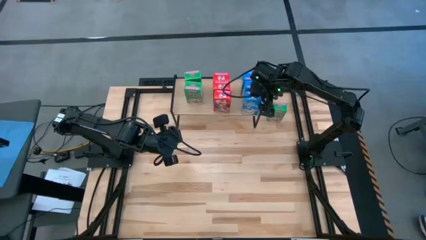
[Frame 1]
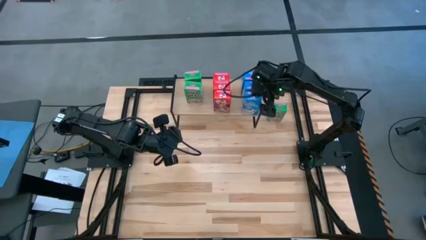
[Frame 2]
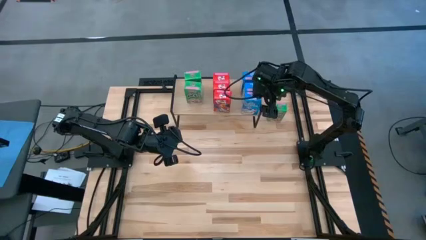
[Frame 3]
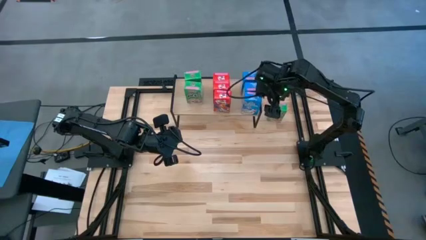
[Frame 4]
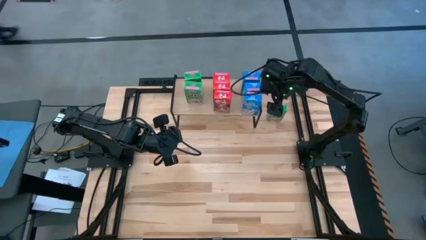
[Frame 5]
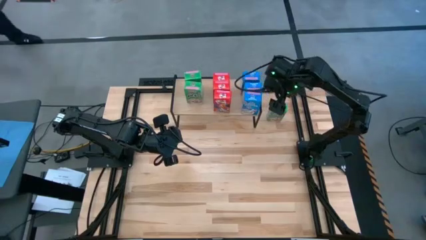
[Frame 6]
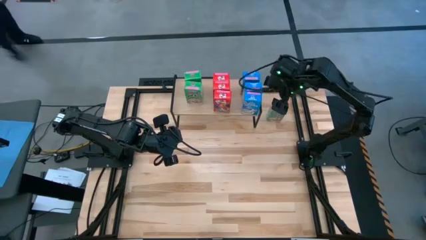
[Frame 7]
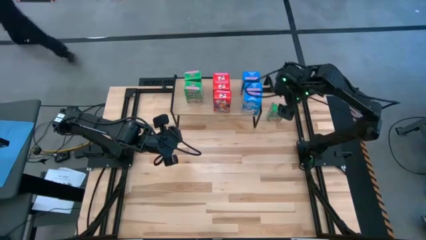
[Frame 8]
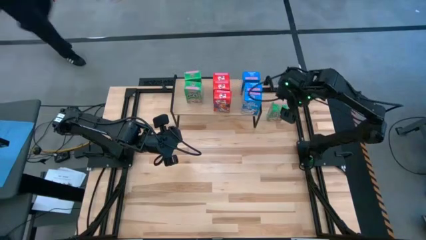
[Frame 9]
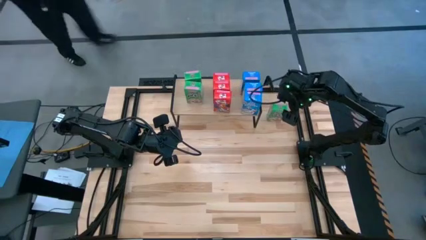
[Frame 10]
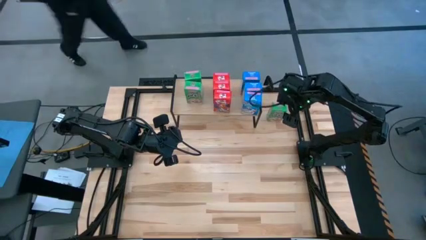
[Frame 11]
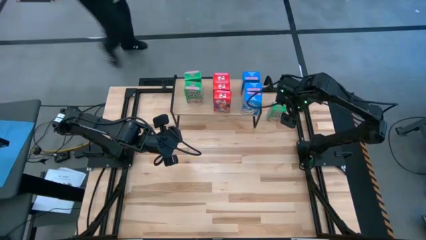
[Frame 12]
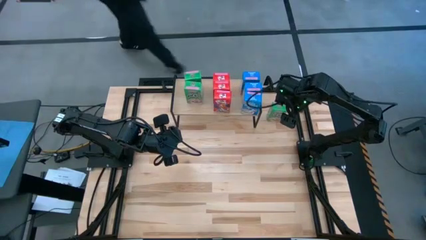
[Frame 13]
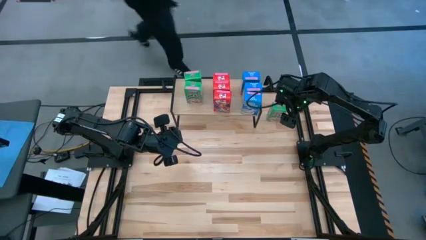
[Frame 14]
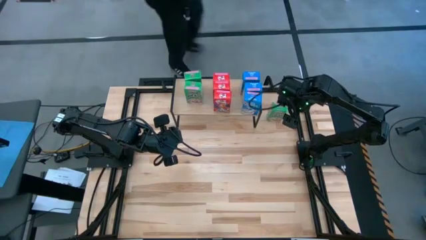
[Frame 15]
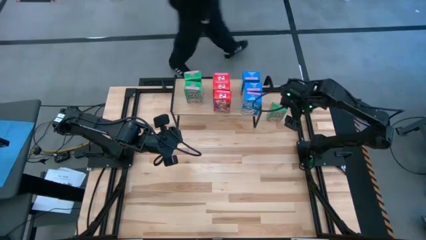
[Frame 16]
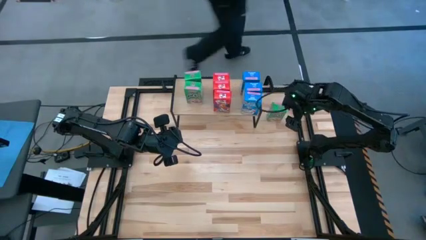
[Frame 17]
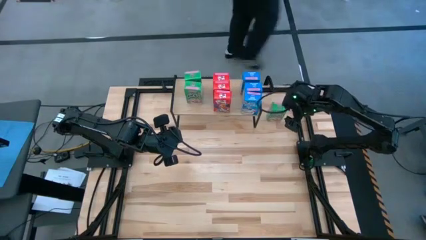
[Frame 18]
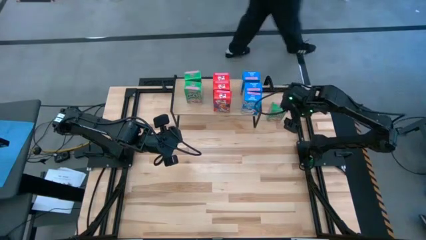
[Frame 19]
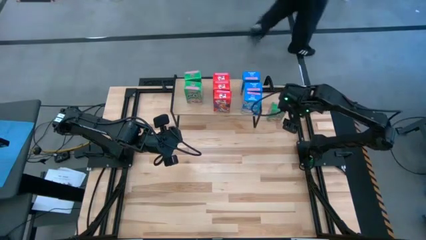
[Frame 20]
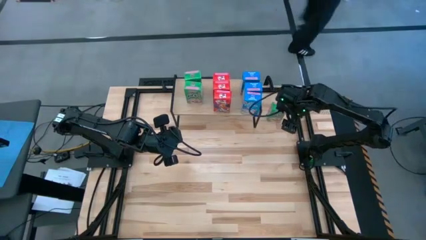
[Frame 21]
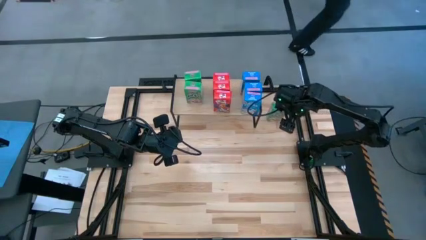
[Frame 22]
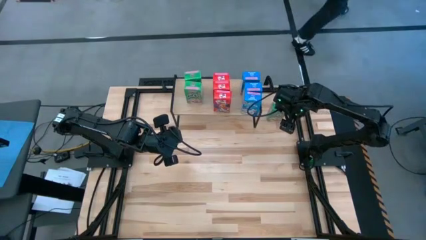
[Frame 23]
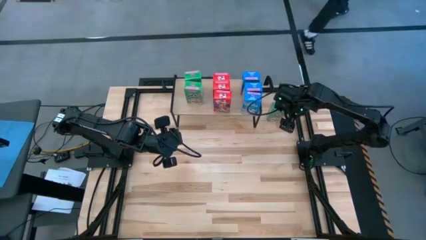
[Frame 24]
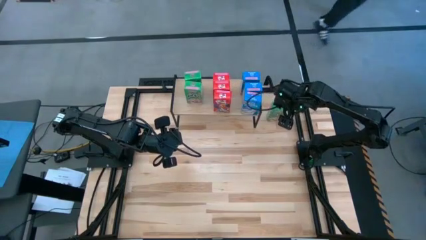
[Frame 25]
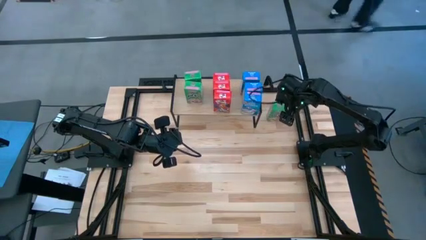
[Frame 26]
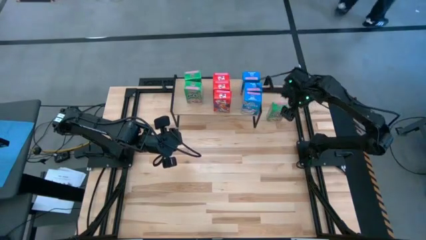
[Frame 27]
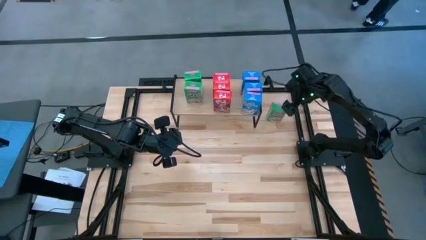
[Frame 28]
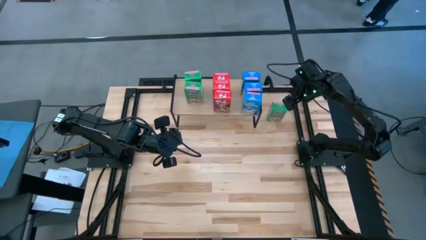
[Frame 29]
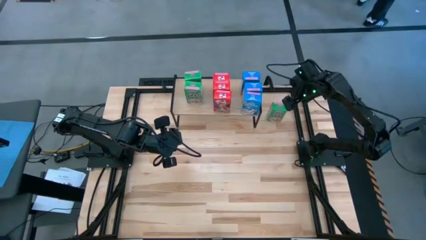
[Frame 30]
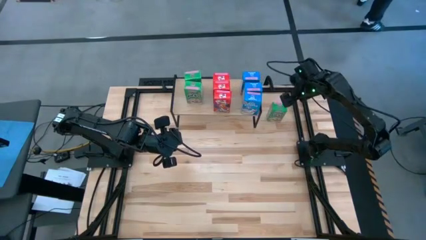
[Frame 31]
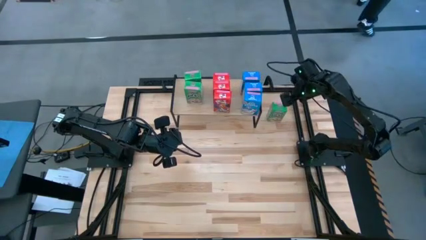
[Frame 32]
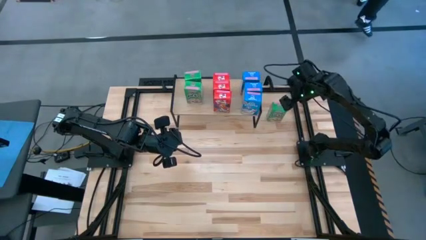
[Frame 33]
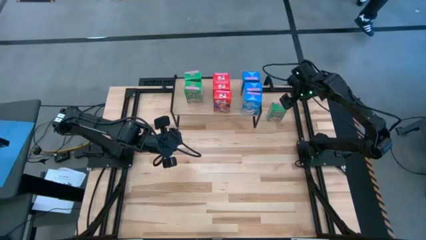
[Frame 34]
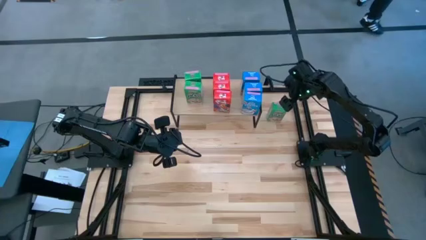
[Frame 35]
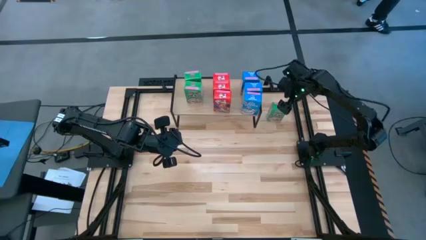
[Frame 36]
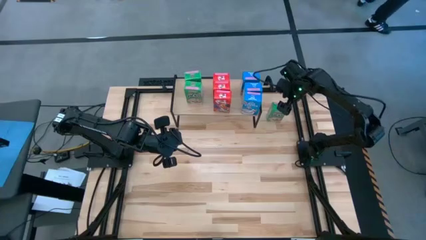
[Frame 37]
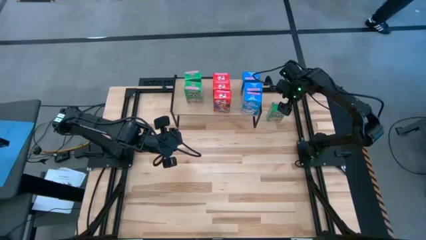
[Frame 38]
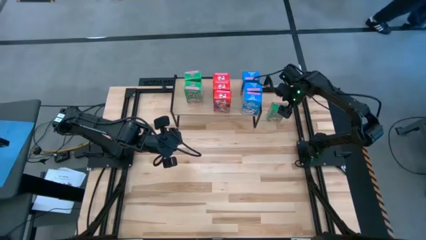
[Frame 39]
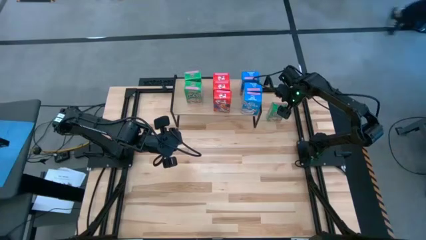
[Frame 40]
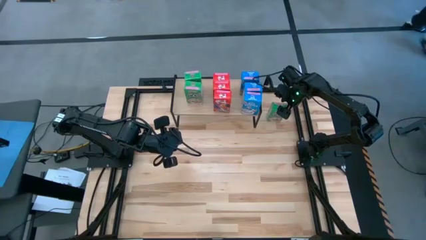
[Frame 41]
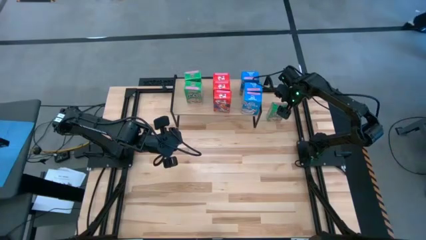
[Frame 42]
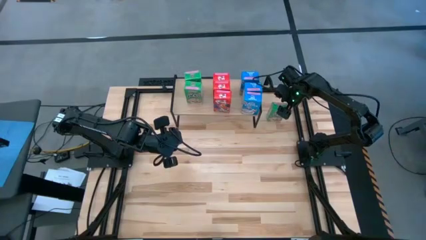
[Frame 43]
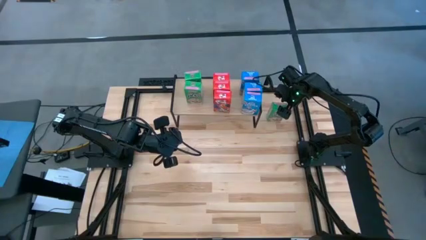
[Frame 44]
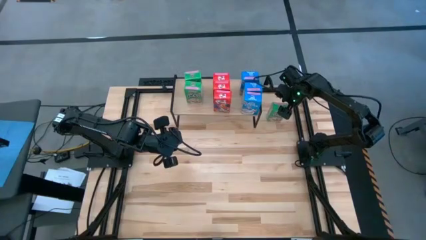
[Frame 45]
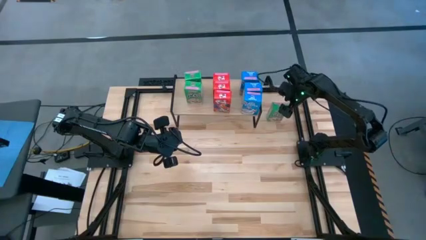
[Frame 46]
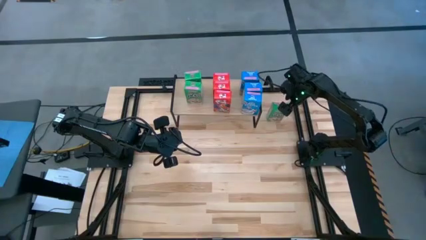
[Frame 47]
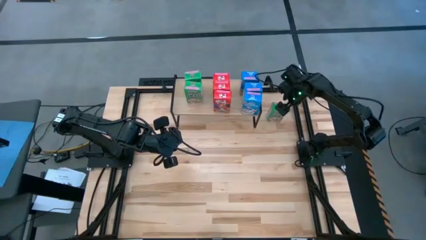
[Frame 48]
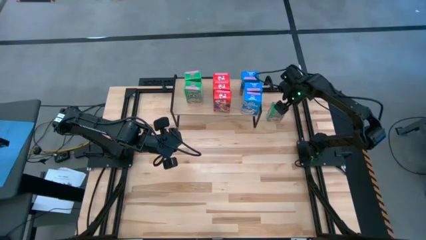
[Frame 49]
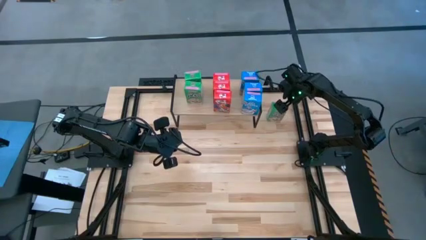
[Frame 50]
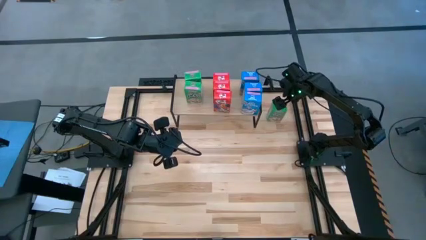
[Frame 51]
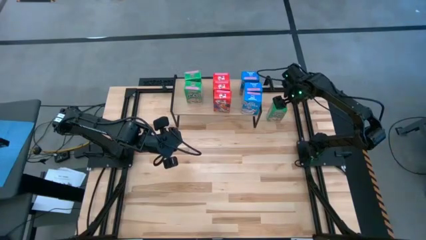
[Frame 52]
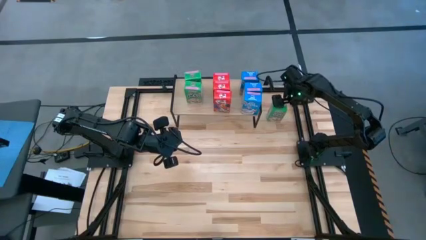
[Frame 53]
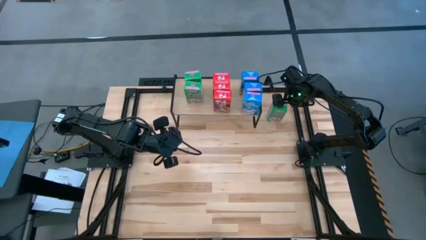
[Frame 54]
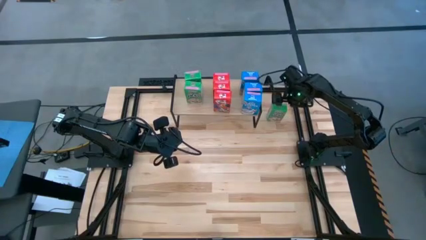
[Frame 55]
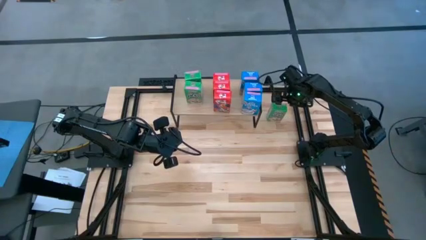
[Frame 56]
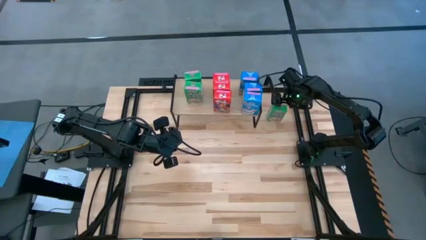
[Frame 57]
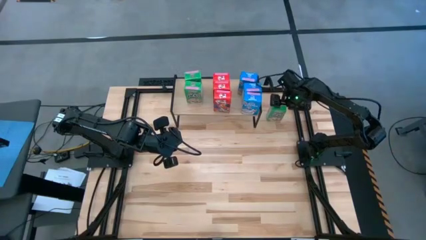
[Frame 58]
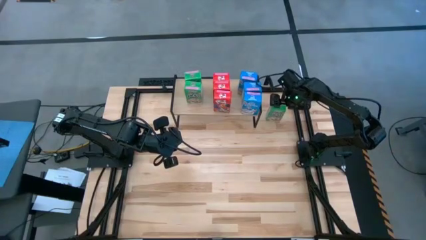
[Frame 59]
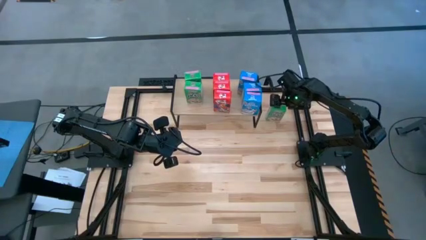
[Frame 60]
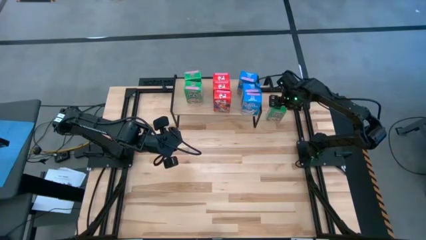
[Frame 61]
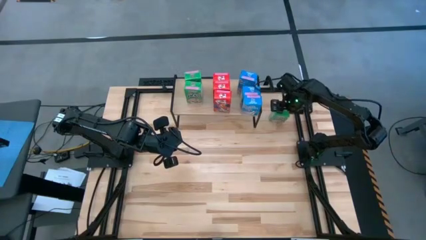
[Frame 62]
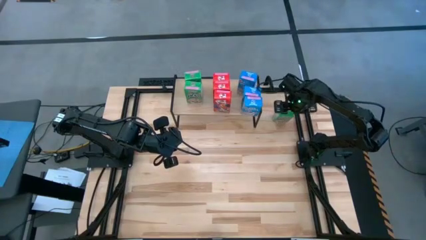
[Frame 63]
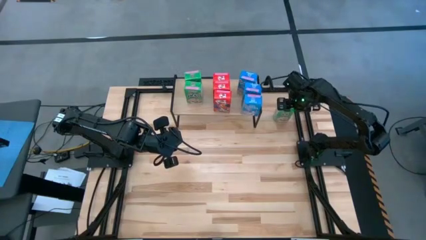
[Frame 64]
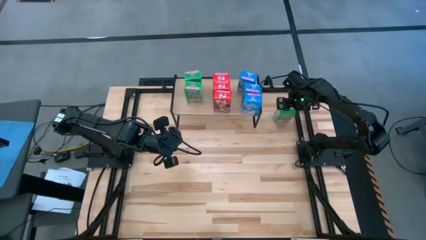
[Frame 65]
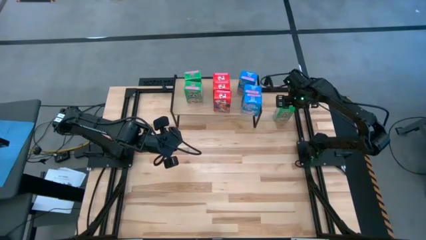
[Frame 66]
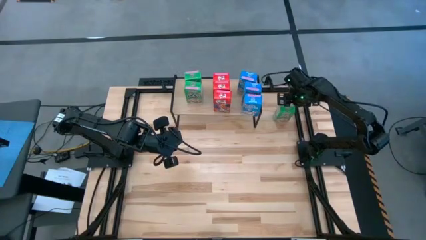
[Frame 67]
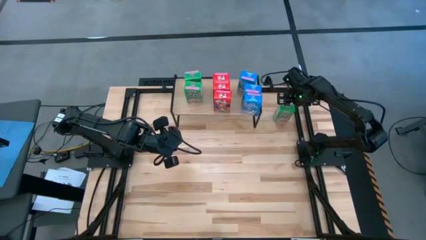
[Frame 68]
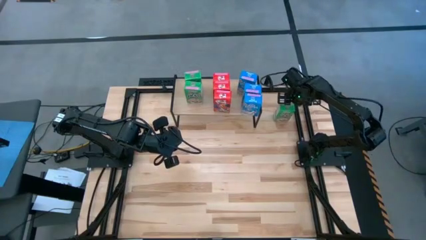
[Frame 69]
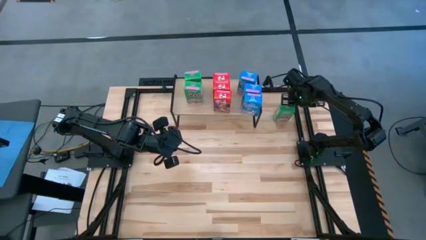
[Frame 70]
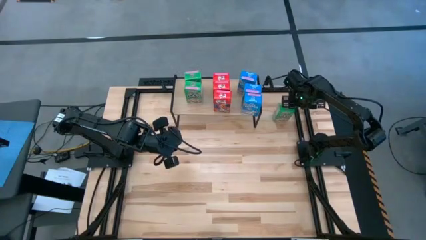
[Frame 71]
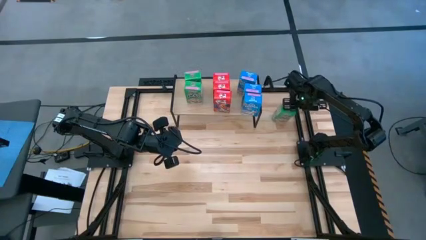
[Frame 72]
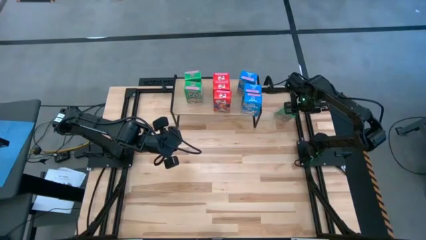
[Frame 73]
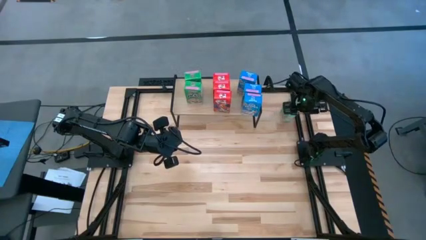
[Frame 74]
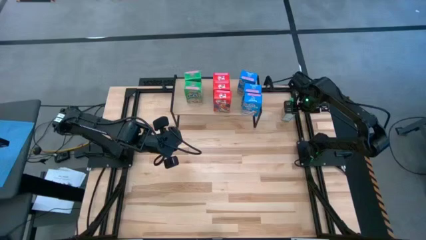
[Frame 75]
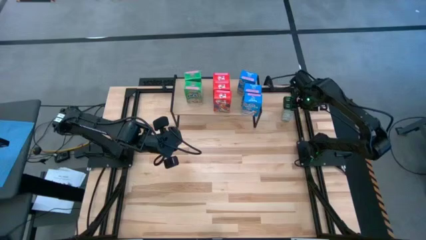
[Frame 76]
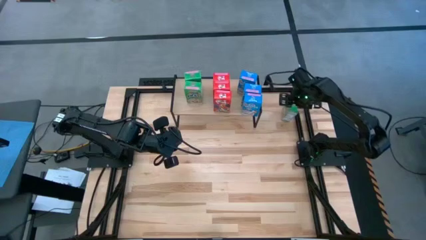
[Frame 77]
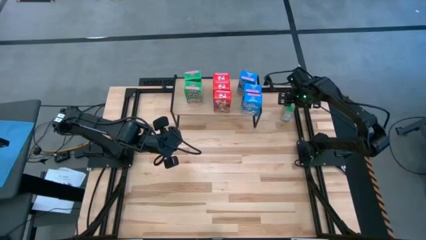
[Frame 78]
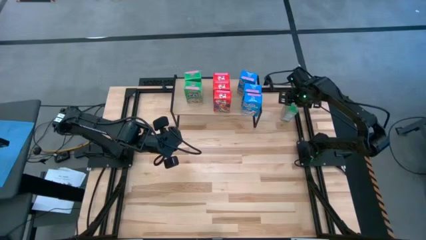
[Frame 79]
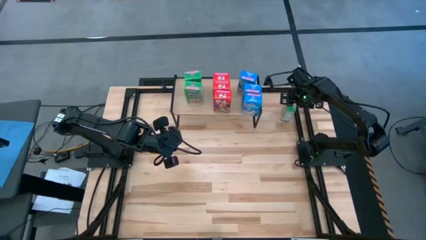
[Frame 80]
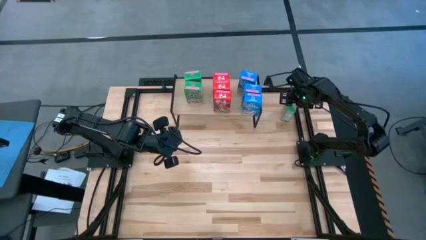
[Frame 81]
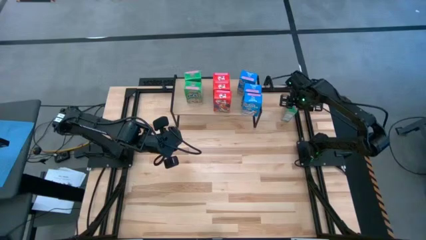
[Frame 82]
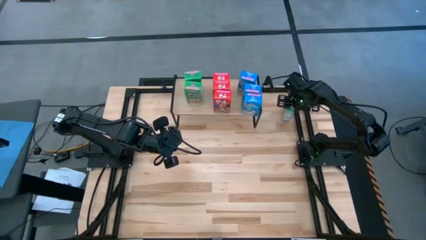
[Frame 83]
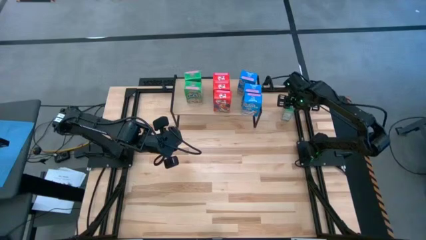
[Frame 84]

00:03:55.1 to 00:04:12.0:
Task: Stack cereal on shelf
Put the green cereal box on the shelf aligned with the other green cereal boxes
